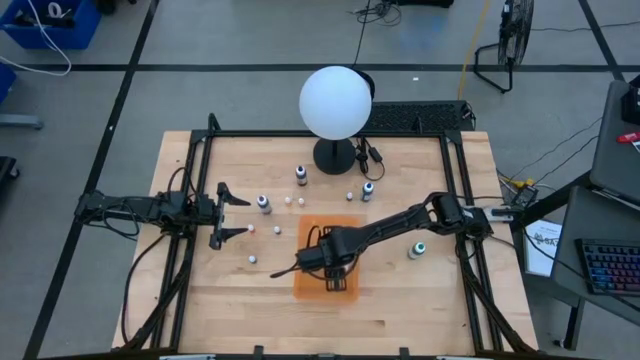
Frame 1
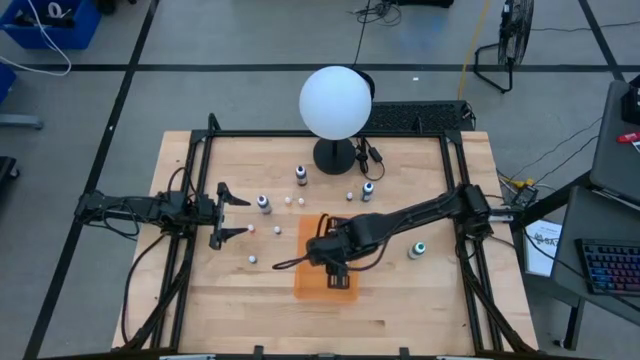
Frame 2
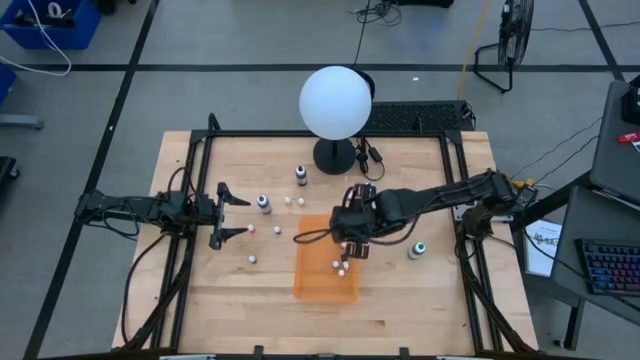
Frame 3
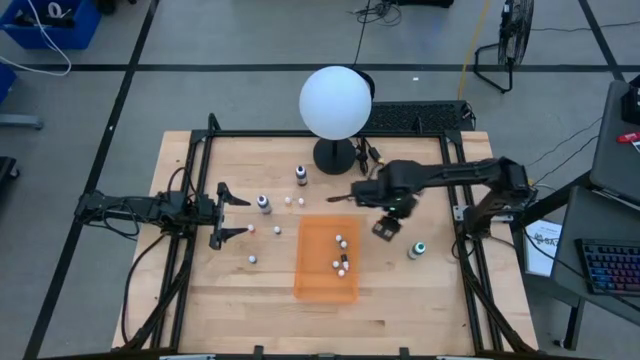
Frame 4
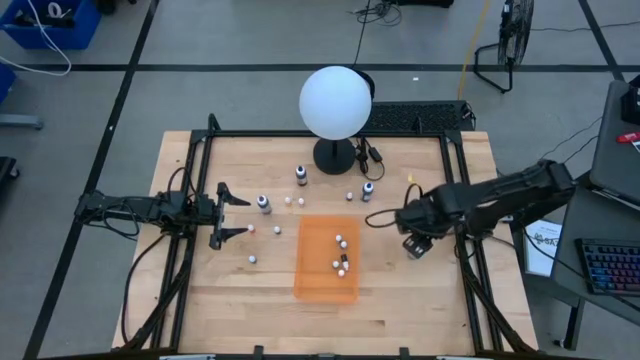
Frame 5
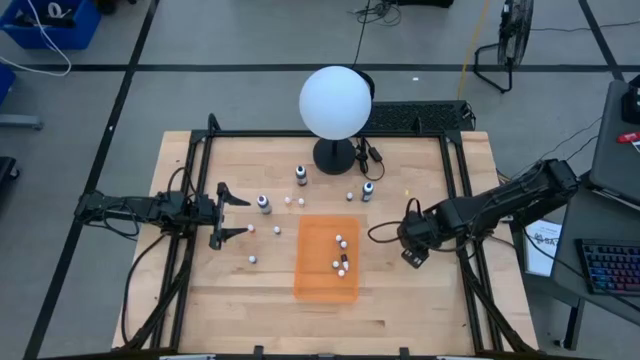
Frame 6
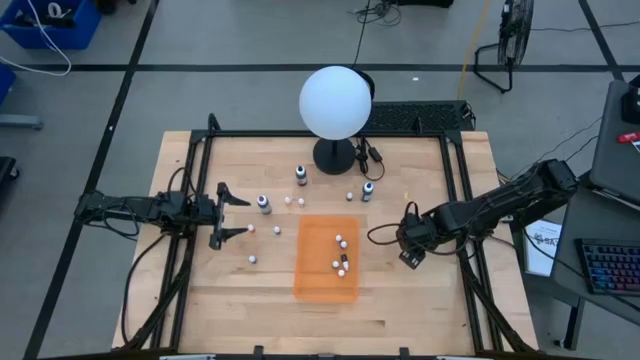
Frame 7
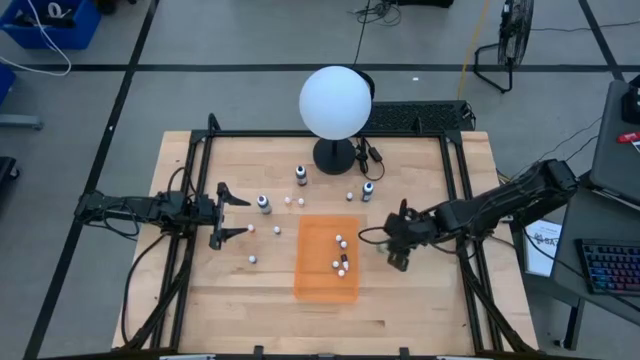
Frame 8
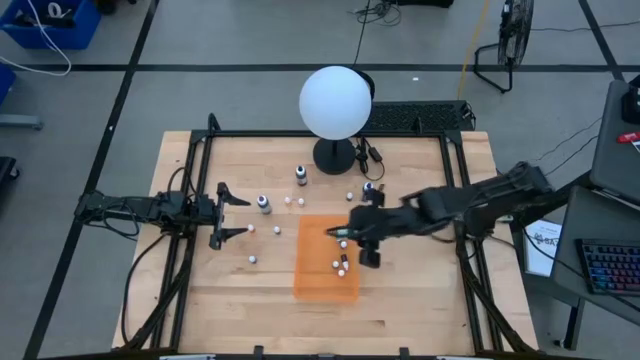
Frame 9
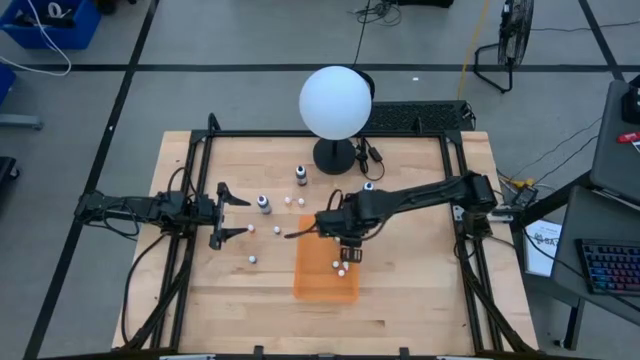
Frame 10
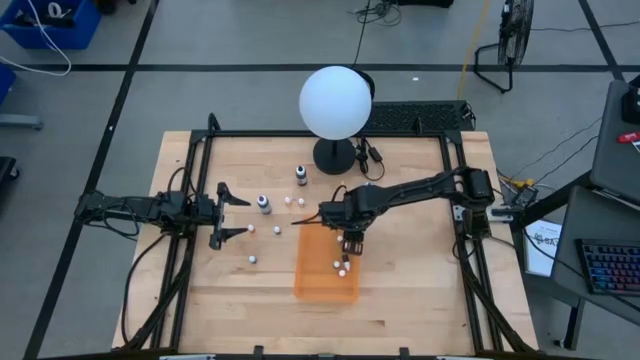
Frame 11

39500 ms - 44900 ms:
Task: Pick & Place food coloring
Put the large green food coloring bottle into the orange bin

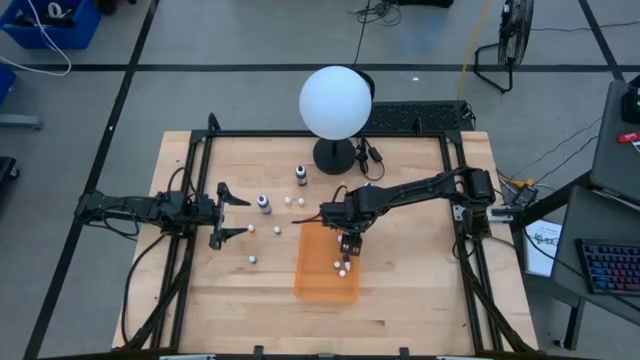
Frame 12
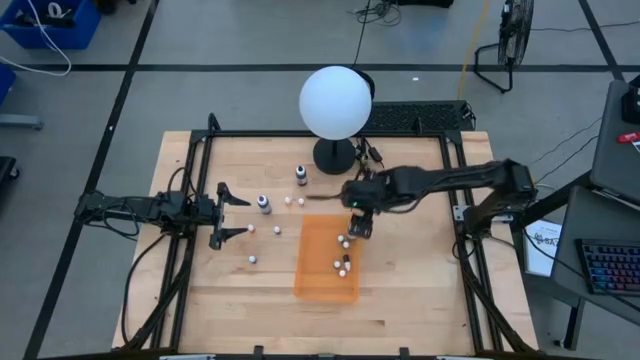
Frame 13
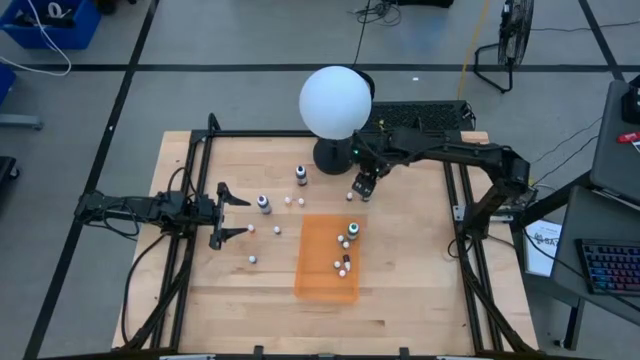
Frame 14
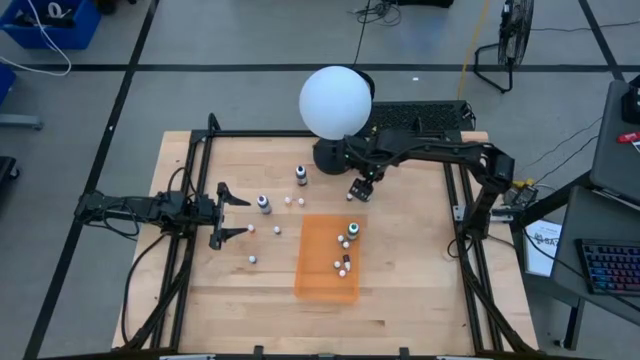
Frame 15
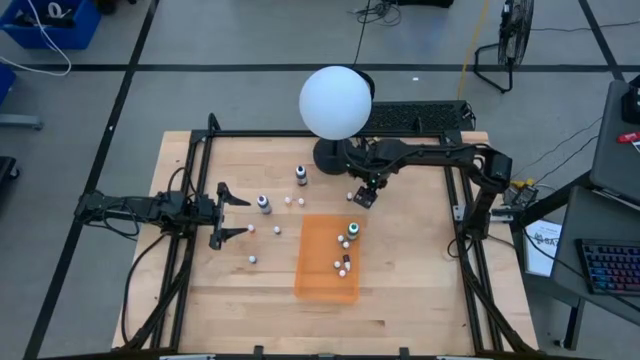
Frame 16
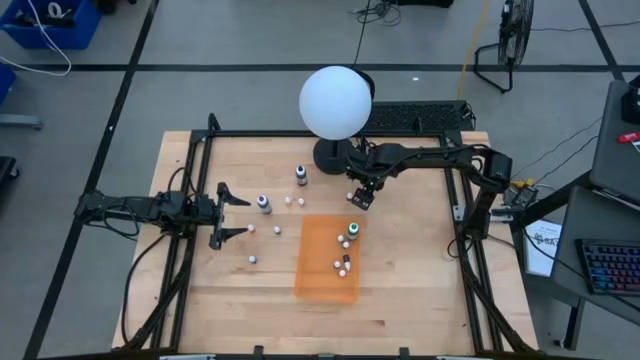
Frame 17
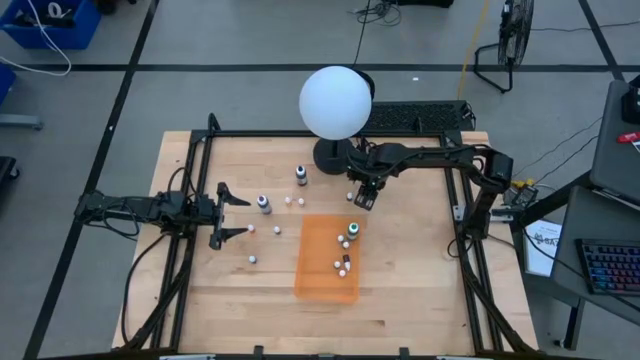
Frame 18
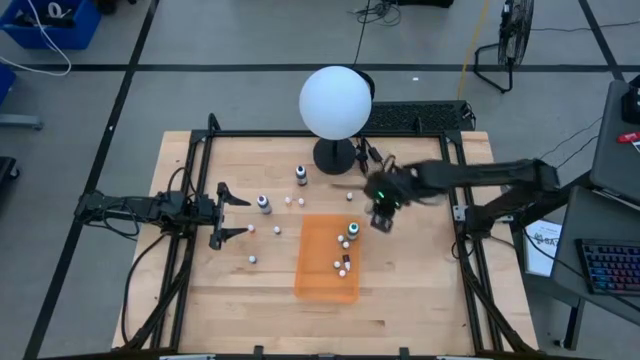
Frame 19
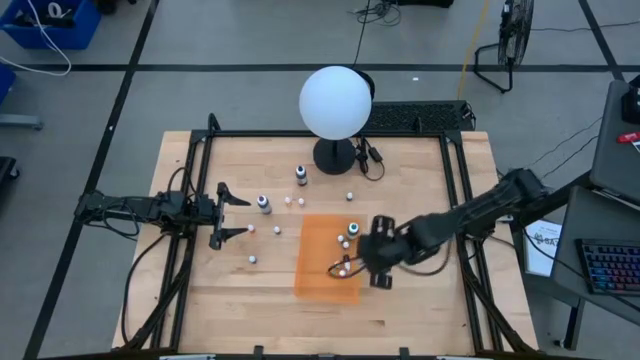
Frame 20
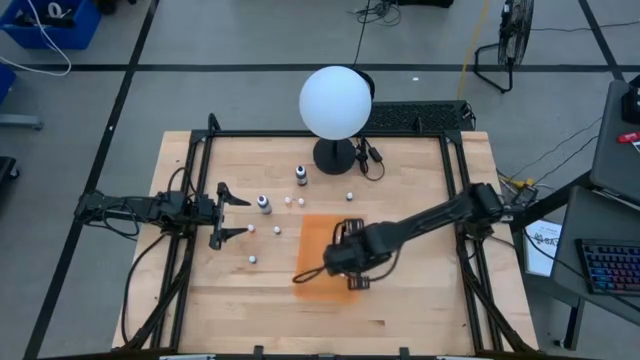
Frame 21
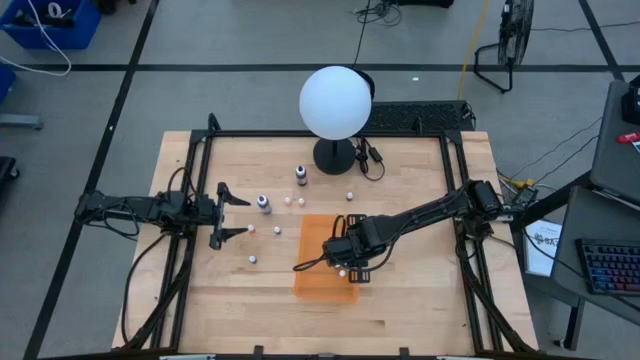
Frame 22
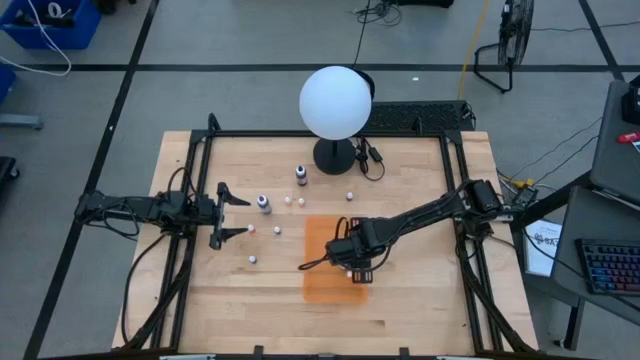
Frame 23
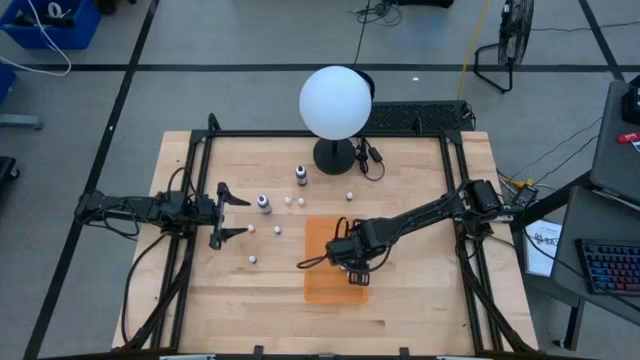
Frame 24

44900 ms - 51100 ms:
Put the large blue food coloring bottle into the orange bin

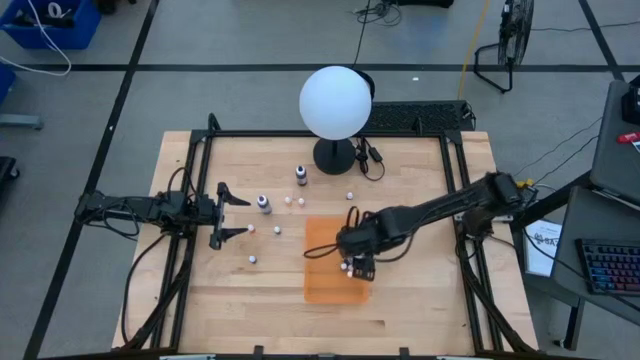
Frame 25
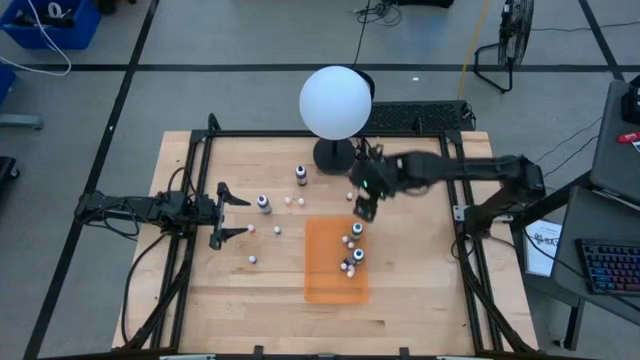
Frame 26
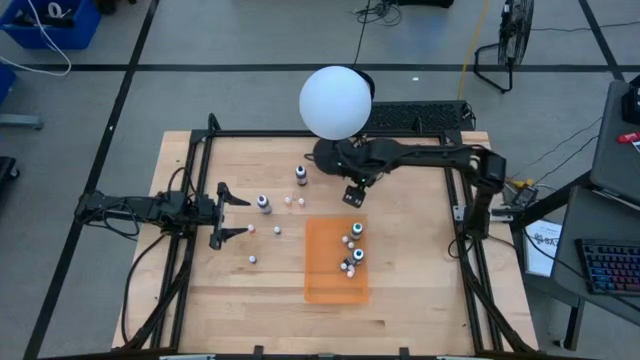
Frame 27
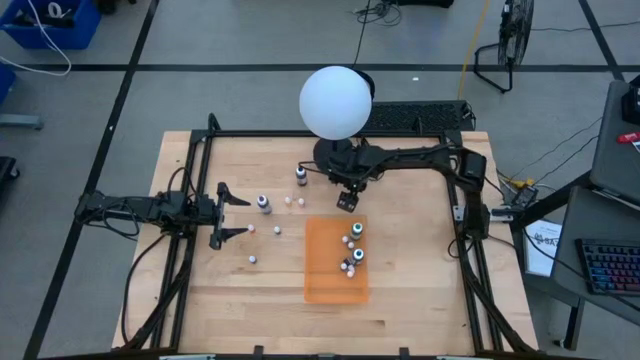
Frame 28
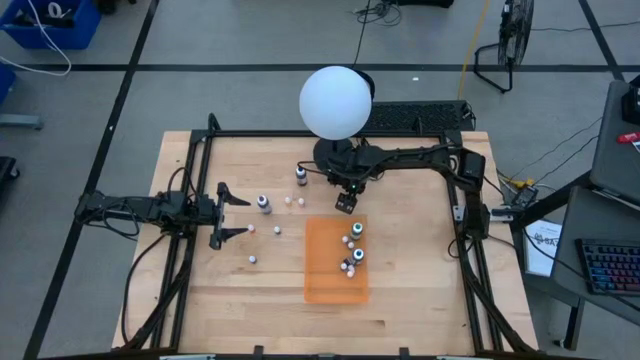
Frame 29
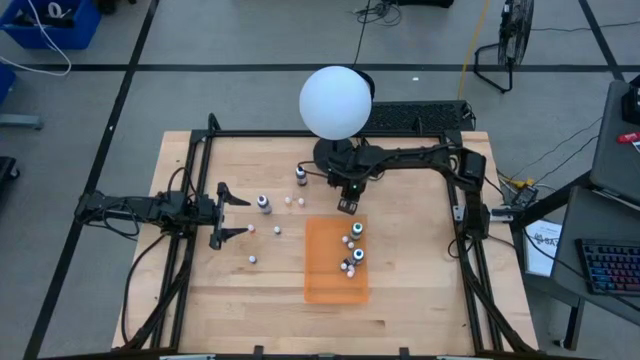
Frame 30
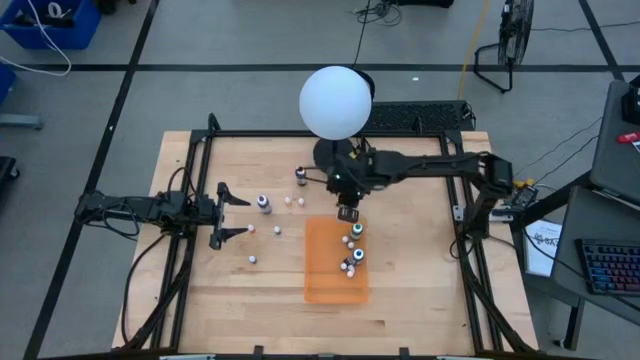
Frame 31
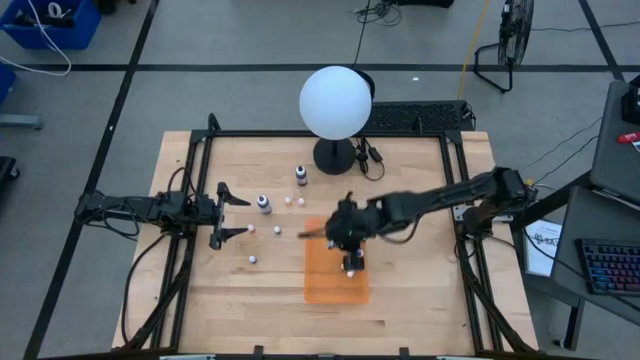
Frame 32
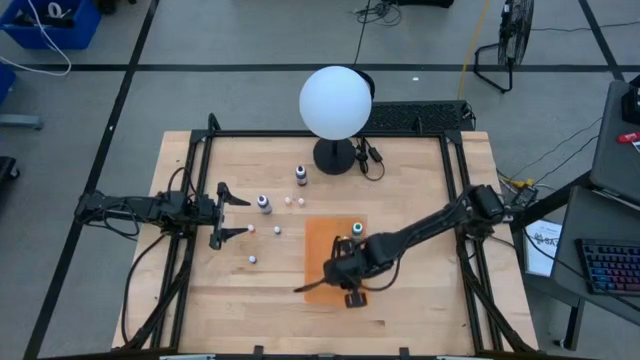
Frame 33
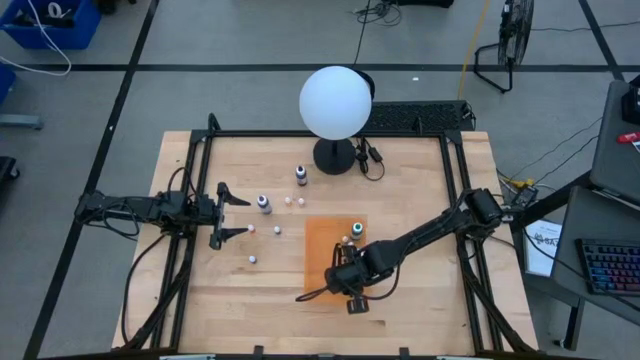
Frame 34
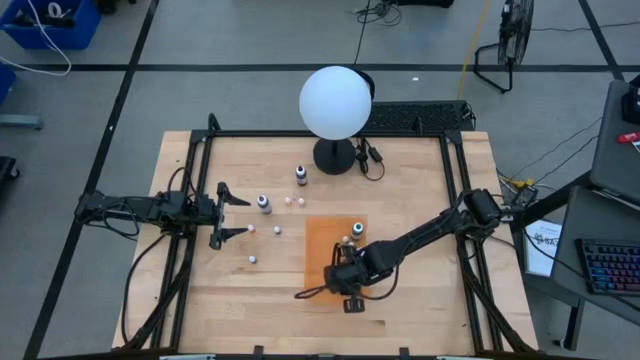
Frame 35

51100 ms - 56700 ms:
Put the small black food coloring bottle into the orange bin

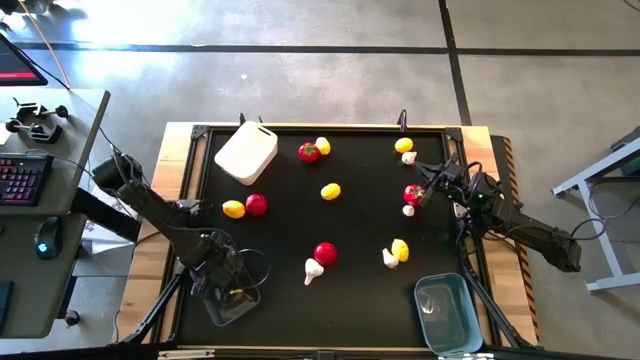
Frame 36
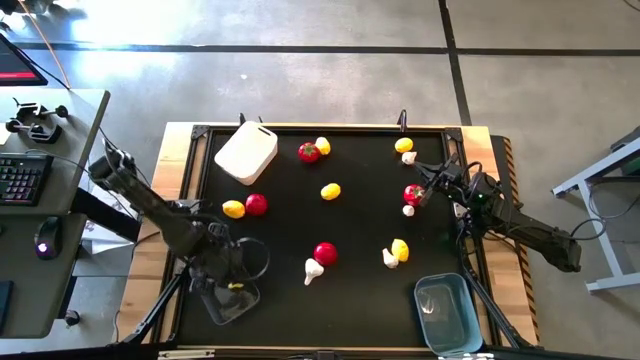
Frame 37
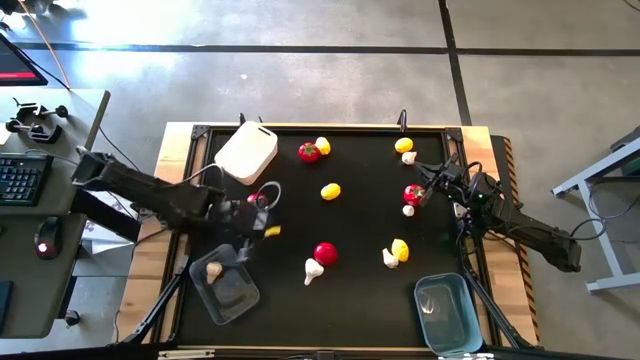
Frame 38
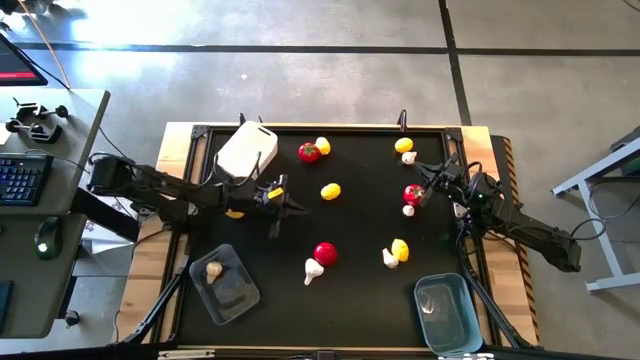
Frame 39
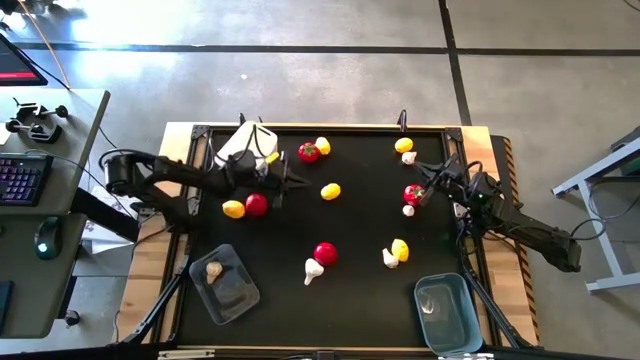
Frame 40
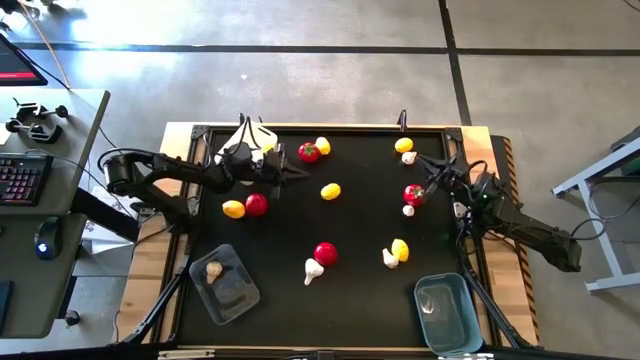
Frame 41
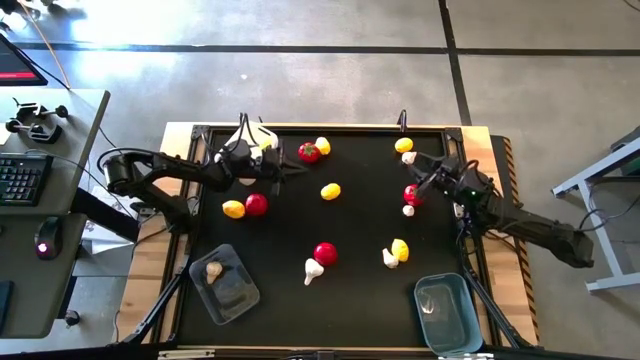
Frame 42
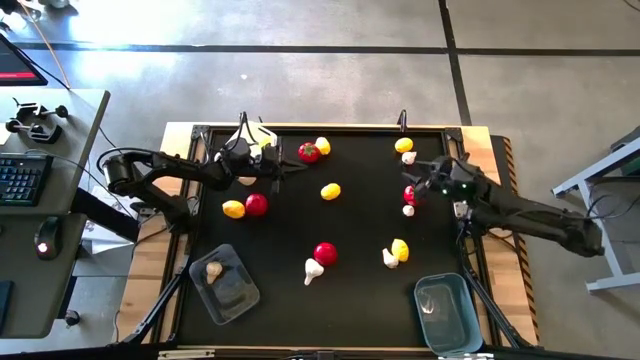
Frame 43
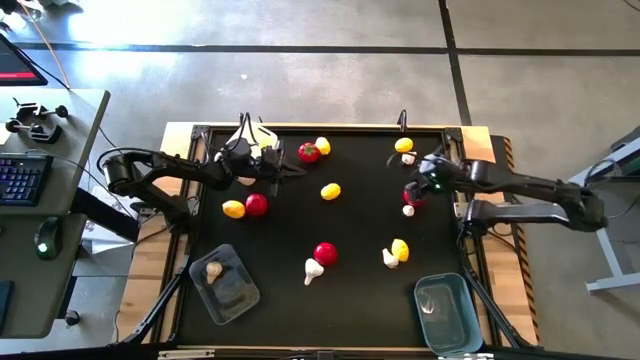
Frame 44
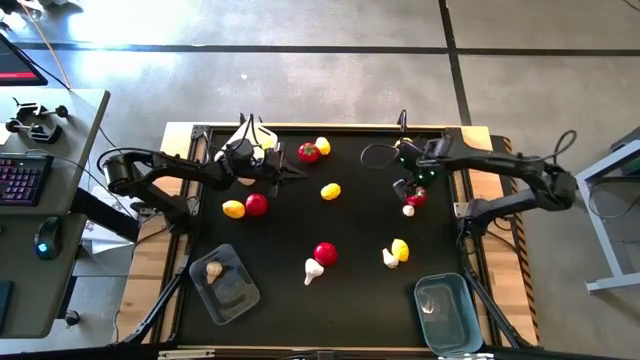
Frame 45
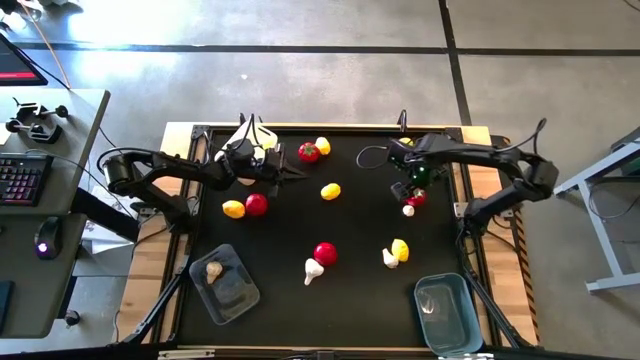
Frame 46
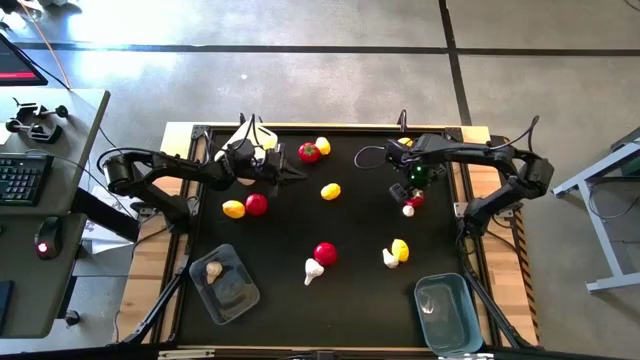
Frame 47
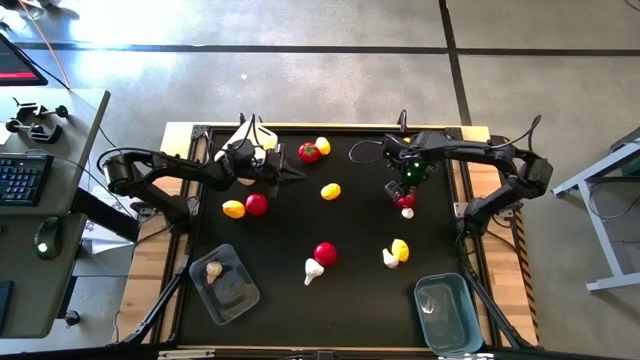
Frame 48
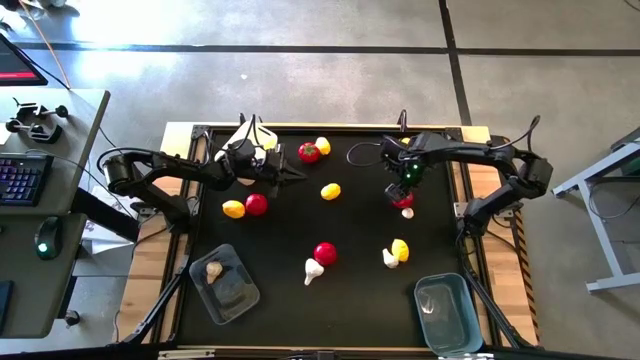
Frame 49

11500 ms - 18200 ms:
Task: Sort produce into baskets
Put the red tomato into the white bin
